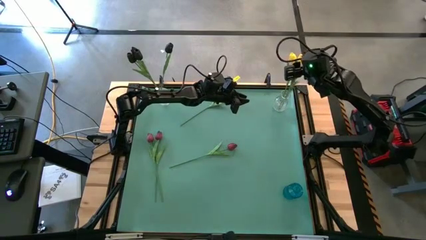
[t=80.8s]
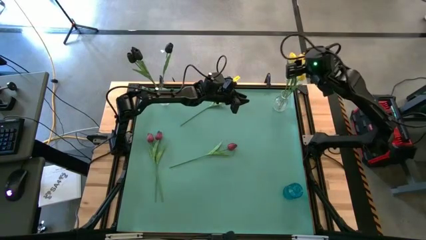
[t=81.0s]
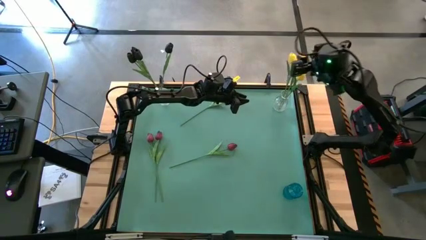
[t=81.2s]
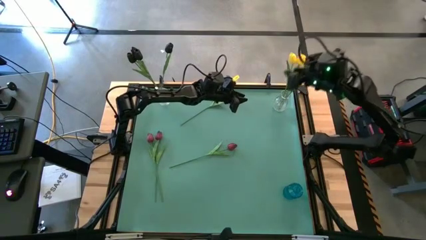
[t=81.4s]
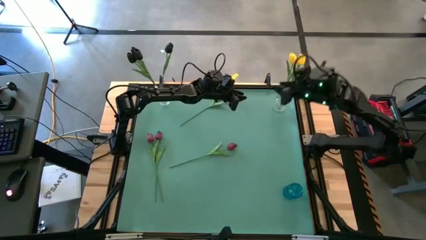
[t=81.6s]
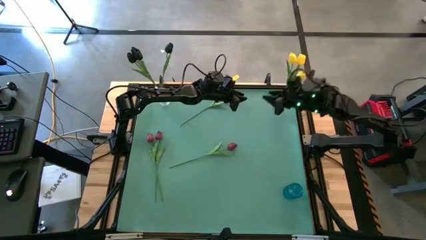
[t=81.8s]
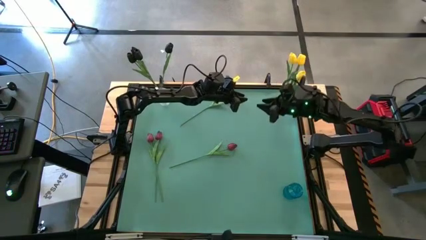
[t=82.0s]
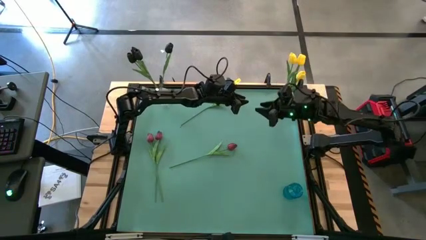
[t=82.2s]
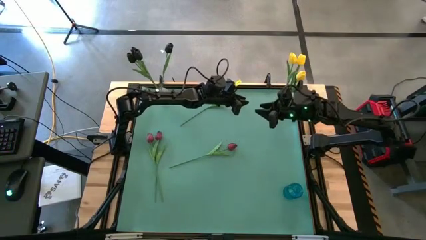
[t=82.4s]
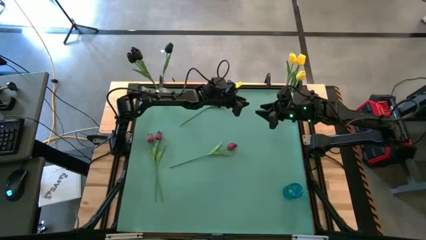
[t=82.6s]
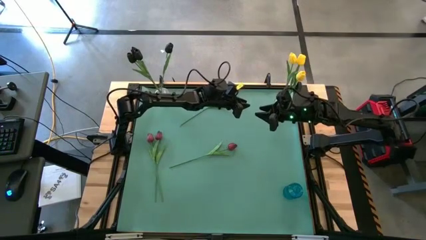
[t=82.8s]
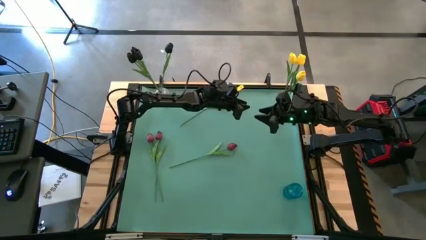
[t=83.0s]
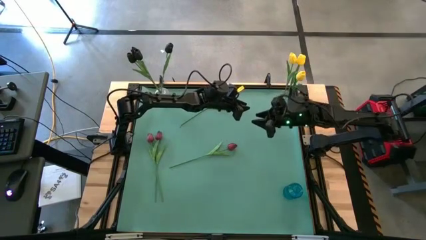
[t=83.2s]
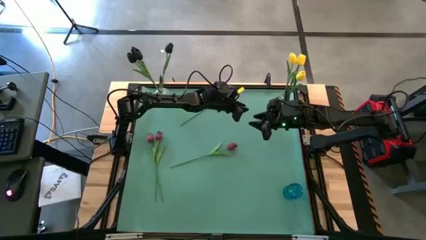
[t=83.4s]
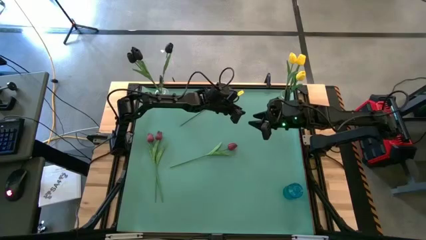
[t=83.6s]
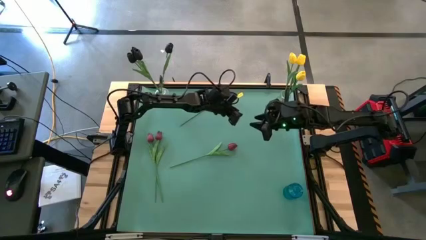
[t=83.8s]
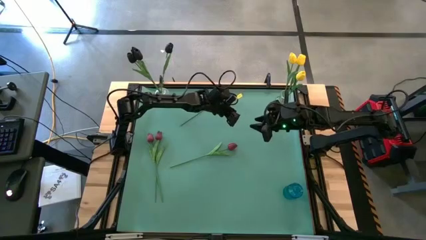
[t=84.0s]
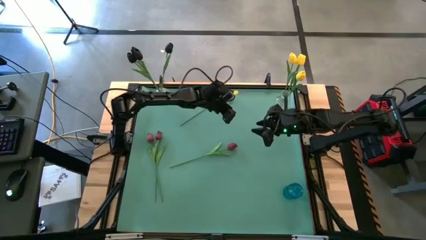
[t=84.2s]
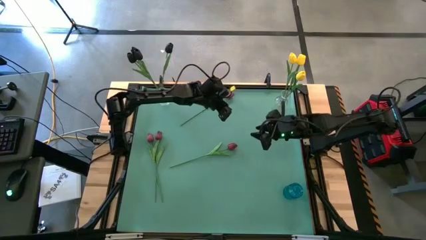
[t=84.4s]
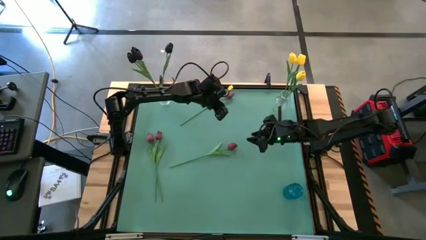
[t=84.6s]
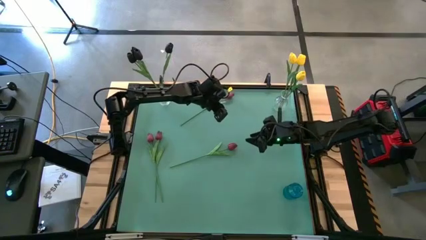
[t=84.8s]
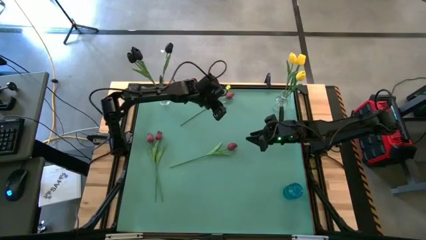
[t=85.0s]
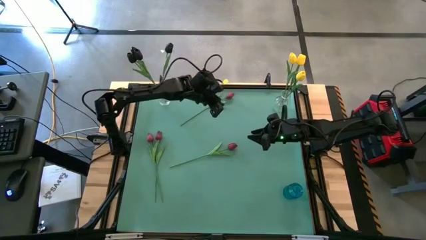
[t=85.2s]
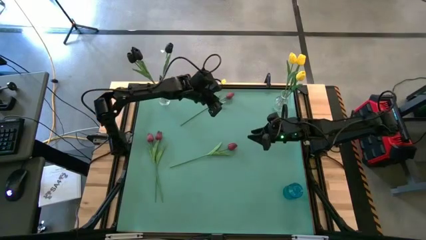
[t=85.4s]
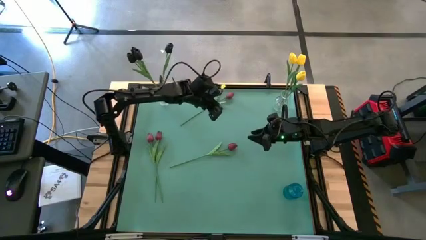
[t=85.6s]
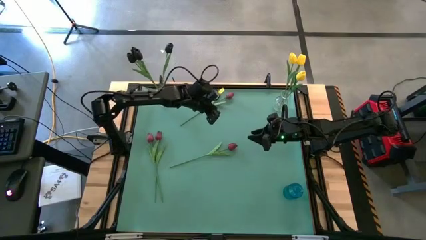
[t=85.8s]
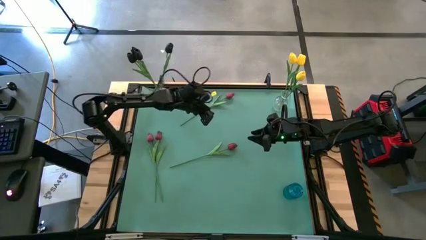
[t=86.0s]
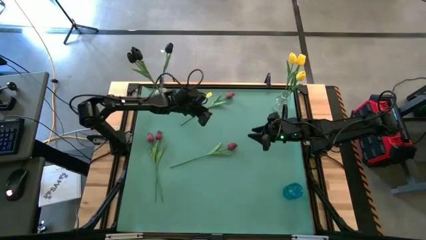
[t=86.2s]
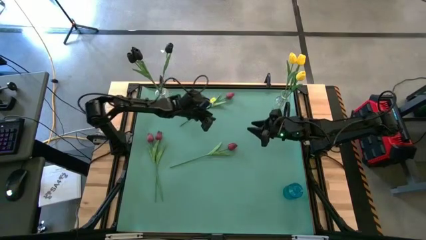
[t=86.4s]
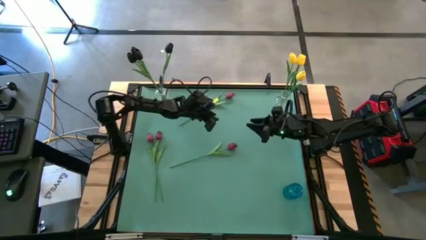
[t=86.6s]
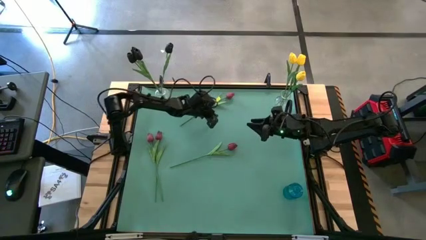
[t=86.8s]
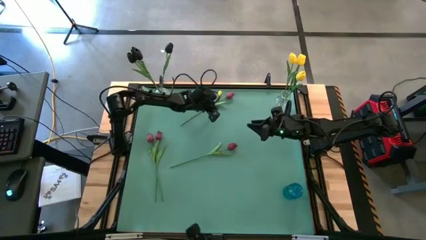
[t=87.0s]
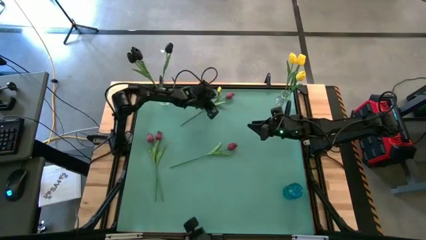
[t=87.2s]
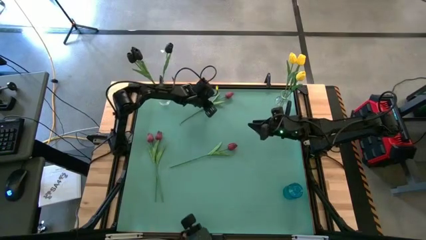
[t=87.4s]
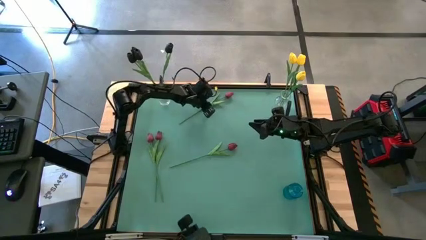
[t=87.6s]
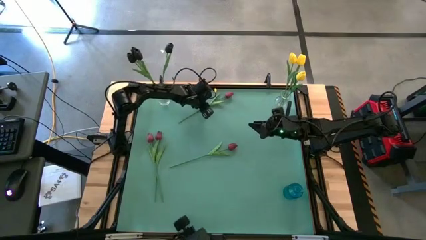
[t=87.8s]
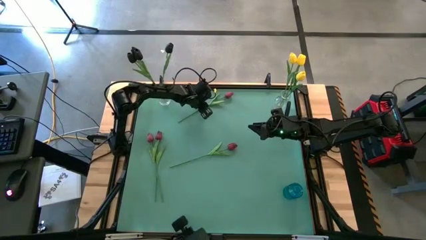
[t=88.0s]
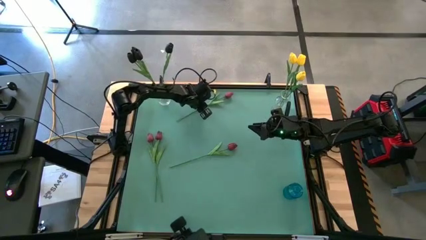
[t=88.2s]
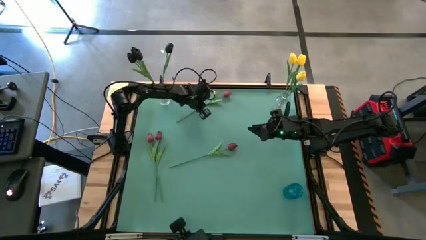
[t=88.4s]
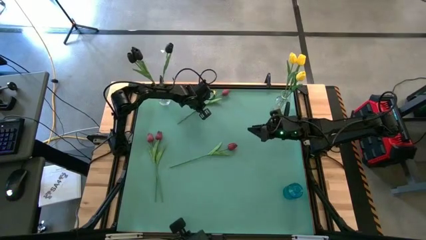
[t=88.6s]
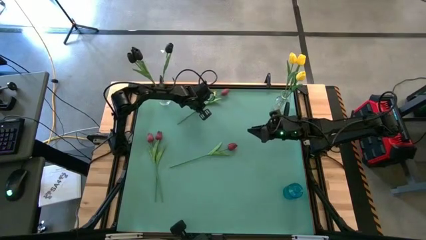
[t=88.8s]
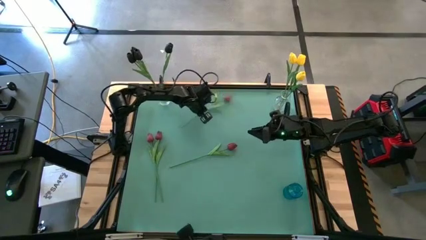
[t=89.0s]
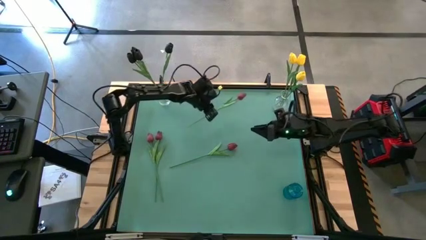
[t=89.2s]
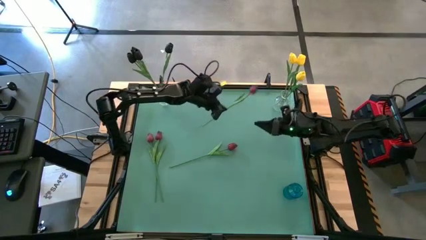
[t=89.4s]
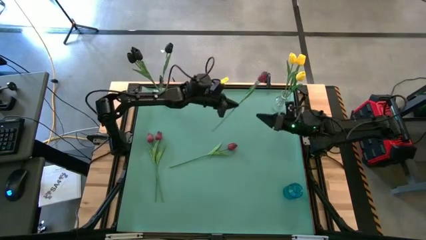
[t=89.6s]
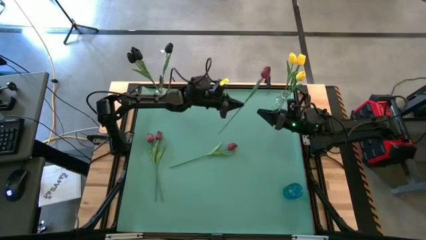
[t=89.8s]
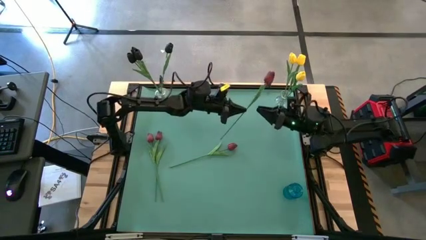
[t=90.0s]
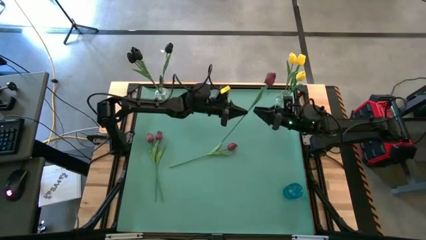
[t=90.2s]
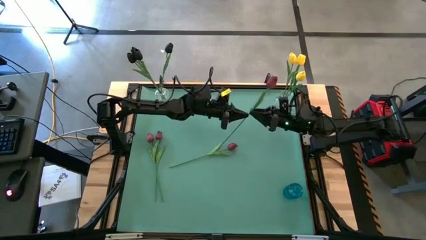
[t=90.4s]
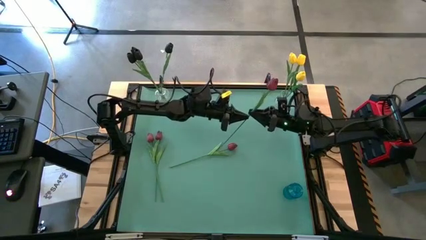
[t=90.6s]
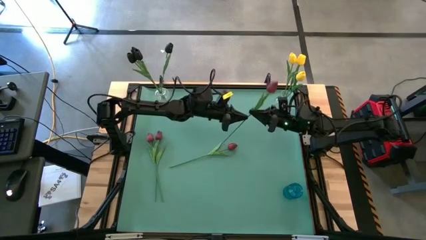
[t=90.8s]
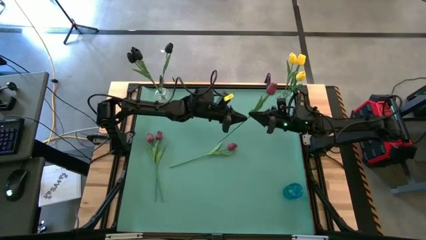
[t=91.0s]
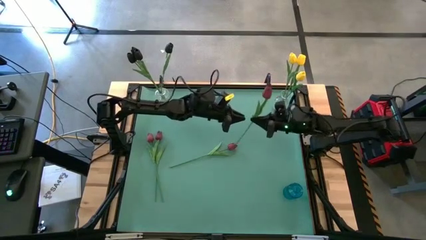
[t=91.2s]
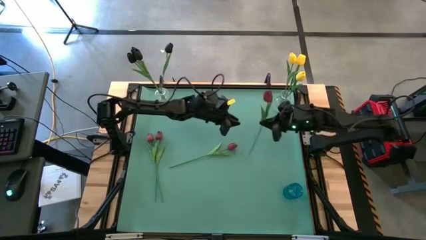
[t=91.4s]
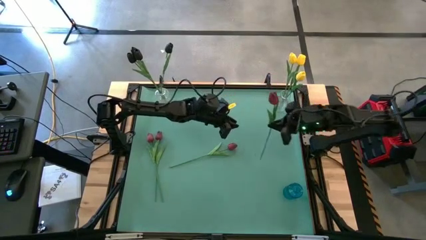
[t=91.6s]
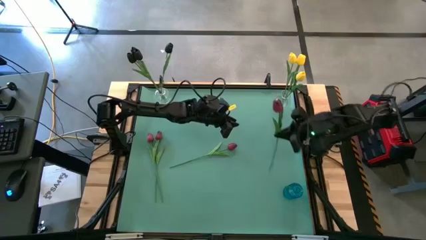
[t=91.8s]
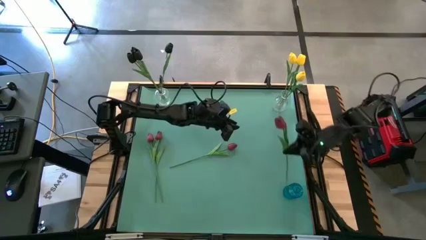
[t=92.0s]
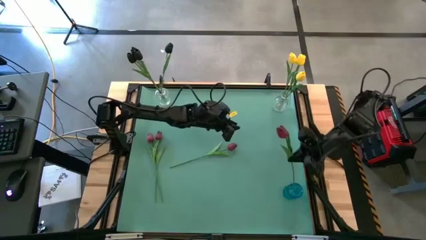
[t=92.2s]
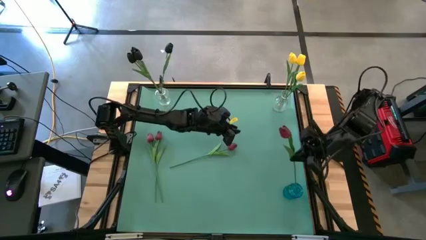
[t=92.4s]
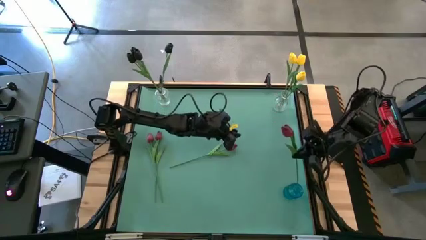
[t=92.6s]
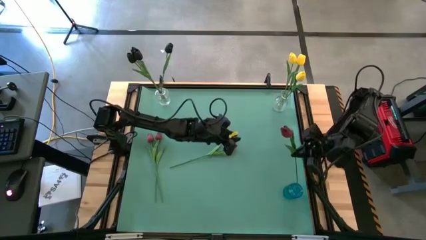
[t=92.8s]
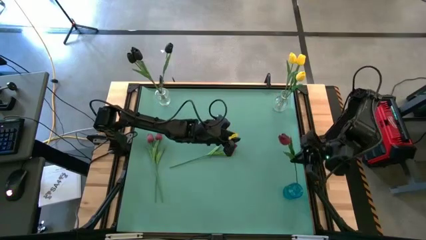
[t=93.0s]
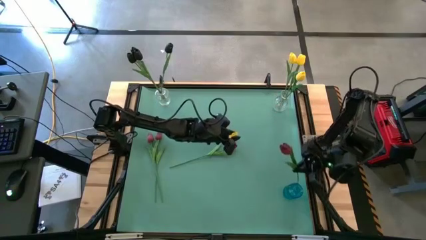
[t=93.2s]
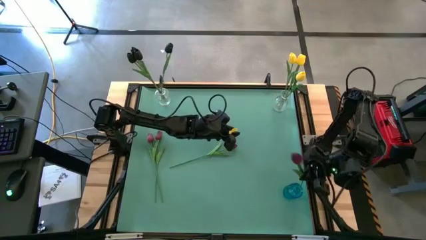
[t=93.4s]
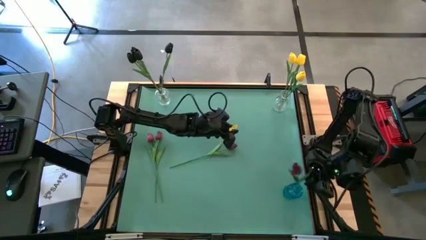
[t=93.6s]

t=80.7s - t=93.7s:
Task: Sort flowers into vase by color
Put the red flower into the blue vase
